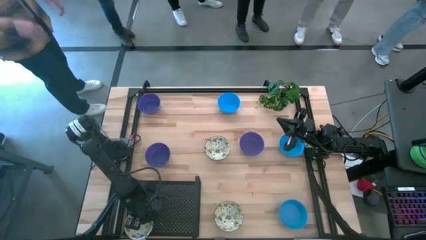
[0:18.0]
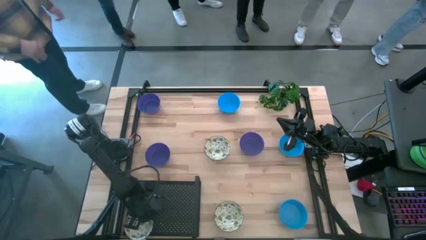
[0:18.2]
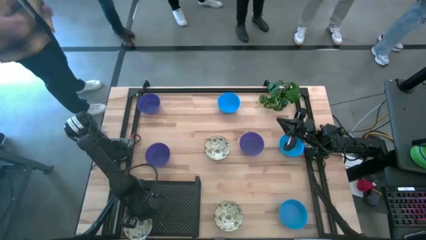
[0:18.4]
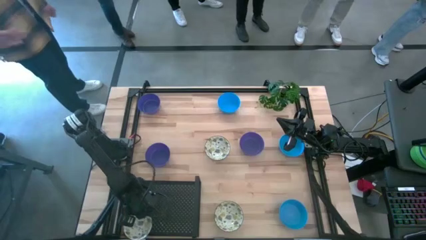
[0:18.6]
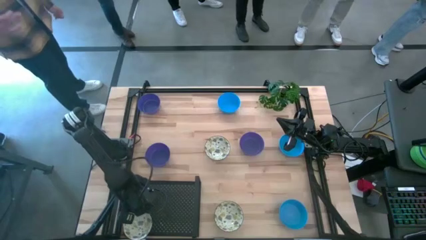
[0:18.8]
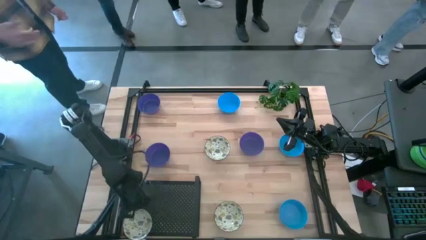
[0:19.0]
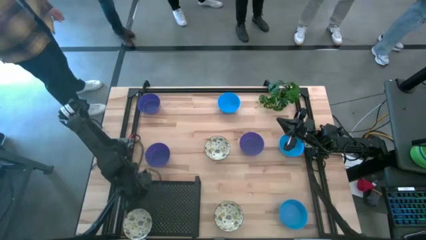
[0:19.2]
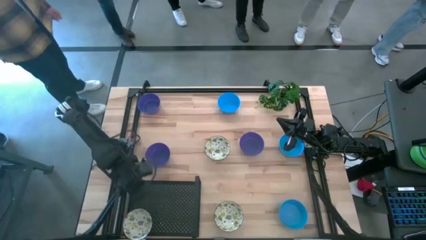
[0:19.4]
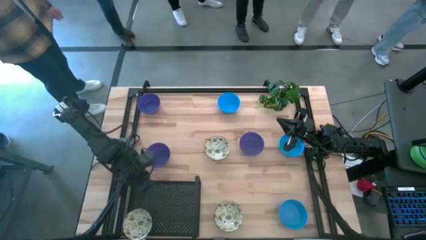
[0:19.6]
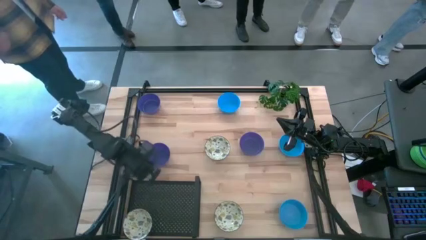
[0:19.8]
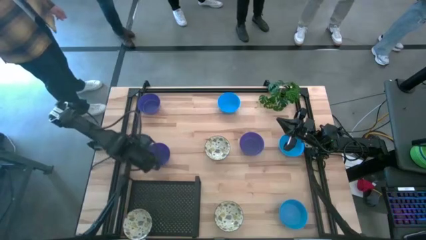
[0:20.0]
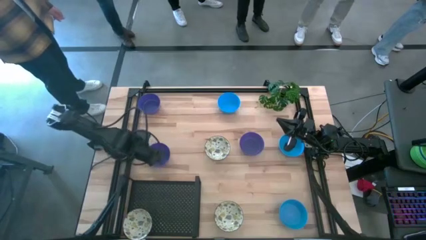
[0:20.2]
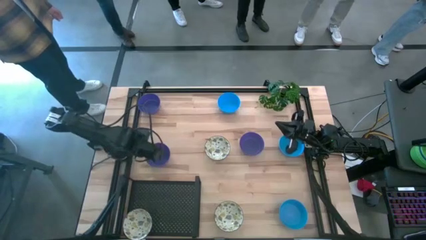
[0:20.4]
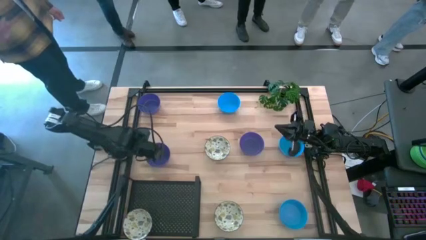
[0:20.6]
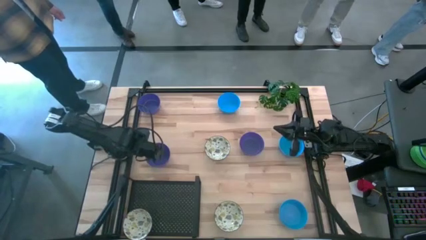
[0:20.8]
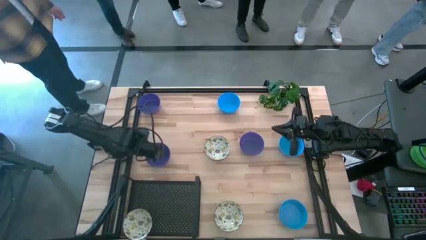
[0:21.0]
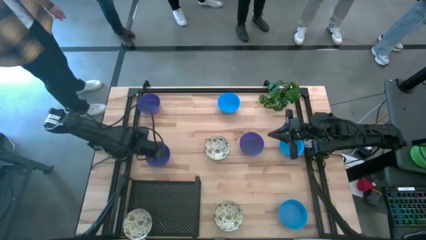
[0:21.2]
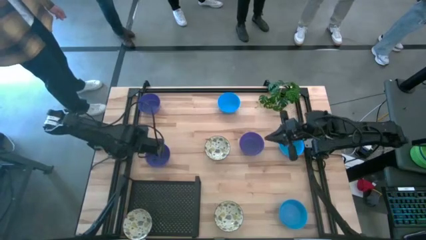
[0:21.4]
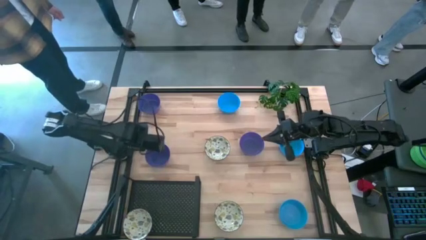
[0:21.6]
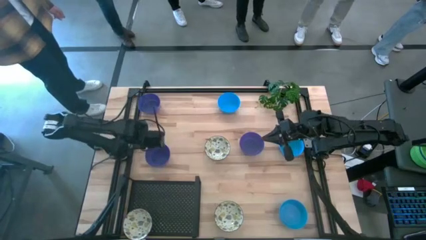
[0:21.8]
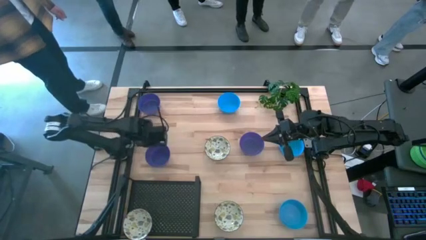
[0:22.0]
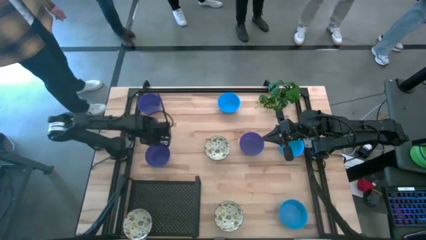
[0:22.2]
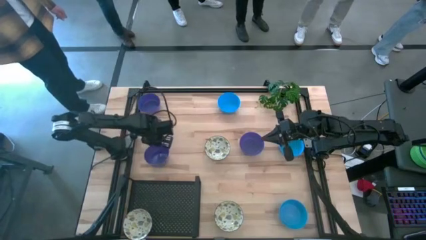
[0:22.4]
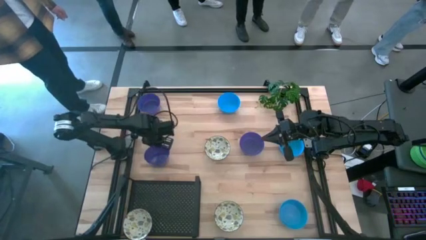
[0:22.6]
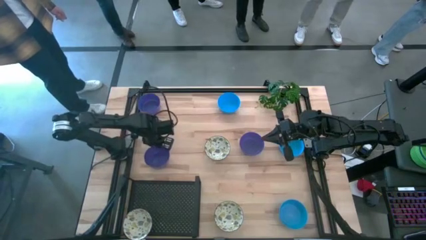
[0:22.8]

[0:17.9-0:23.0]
Task: Pick & Place Mini bowls
Put the bottom left purple bowl on the shelf

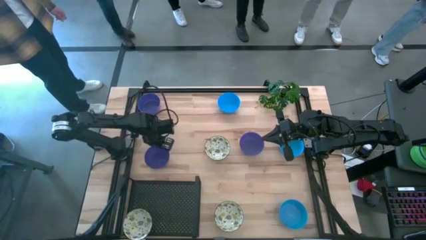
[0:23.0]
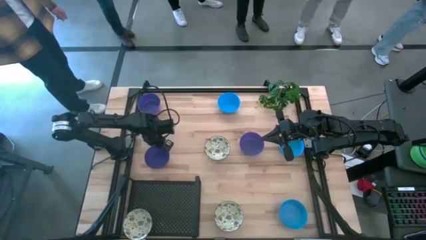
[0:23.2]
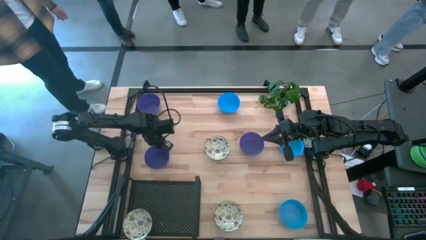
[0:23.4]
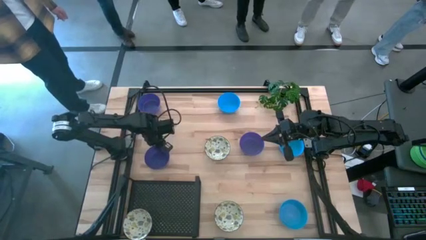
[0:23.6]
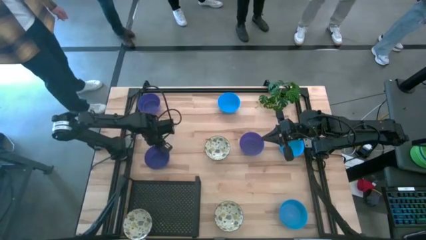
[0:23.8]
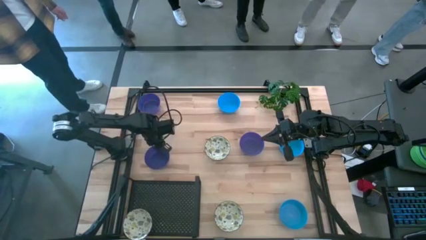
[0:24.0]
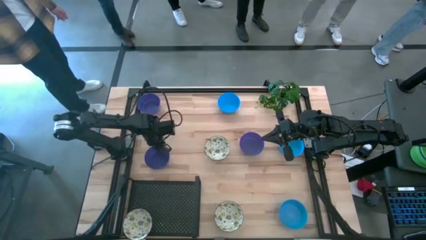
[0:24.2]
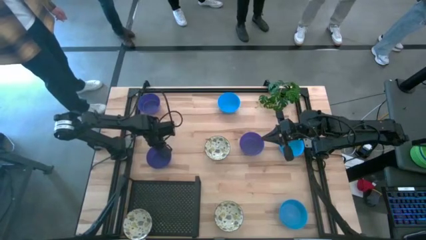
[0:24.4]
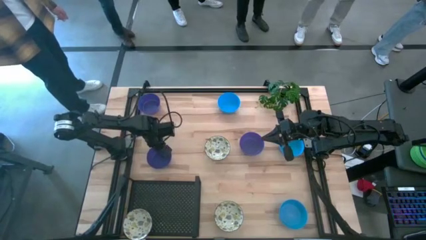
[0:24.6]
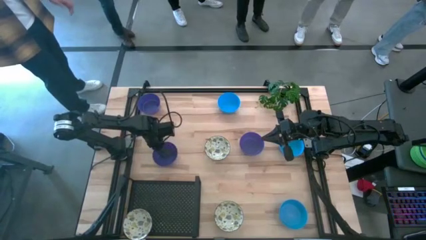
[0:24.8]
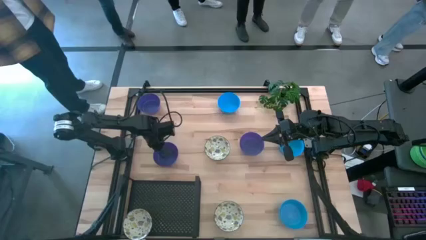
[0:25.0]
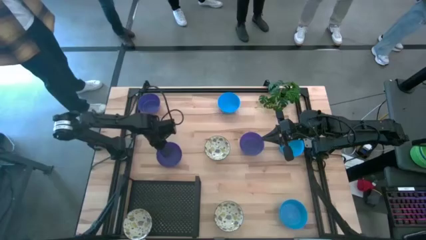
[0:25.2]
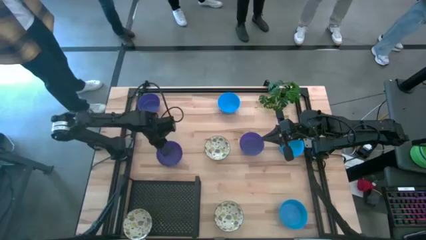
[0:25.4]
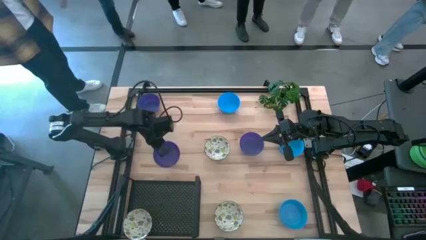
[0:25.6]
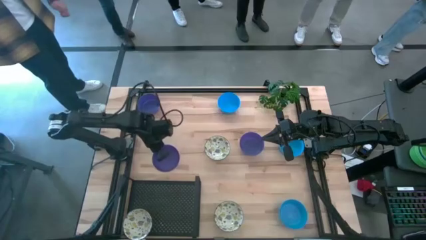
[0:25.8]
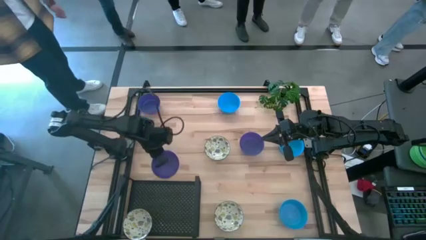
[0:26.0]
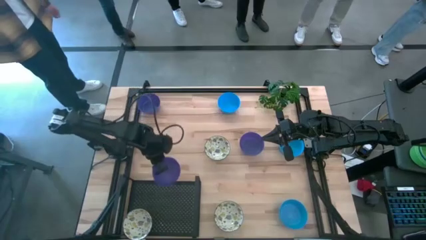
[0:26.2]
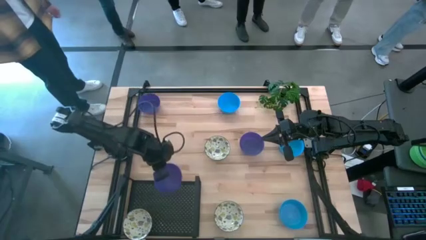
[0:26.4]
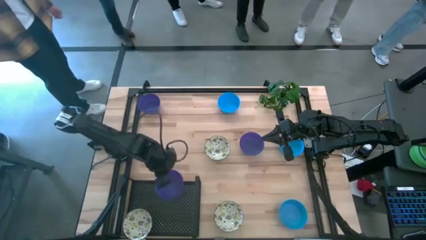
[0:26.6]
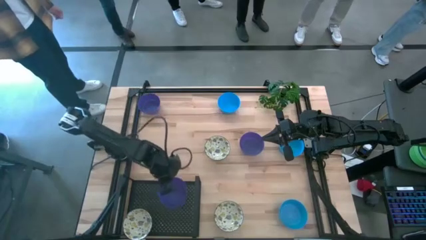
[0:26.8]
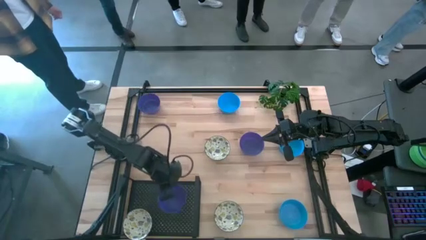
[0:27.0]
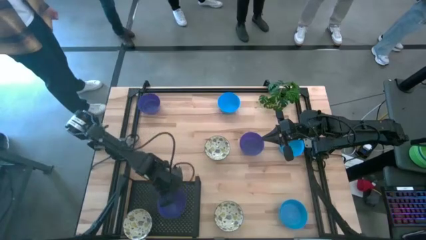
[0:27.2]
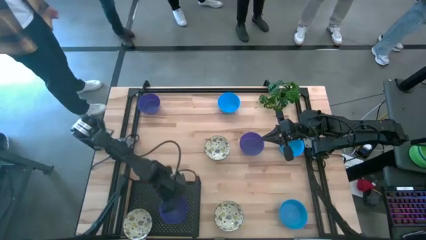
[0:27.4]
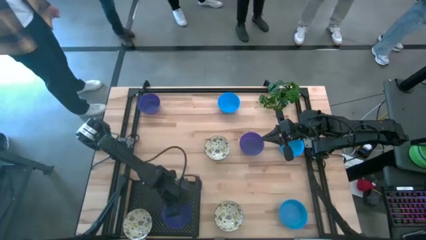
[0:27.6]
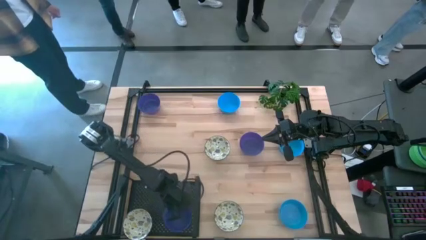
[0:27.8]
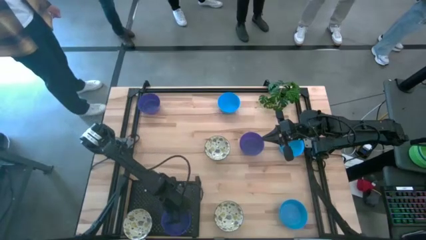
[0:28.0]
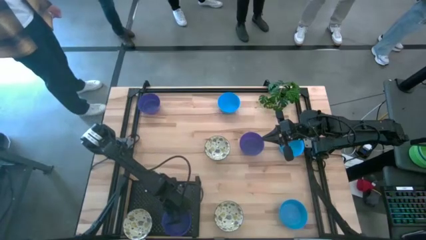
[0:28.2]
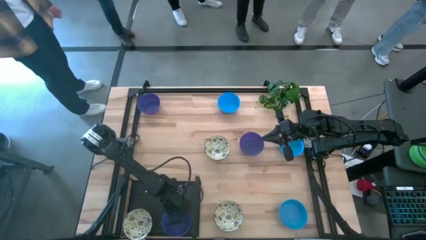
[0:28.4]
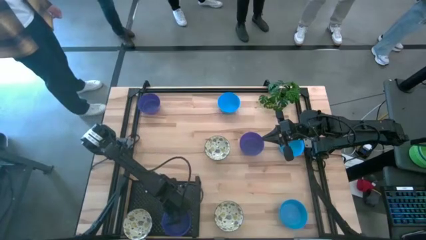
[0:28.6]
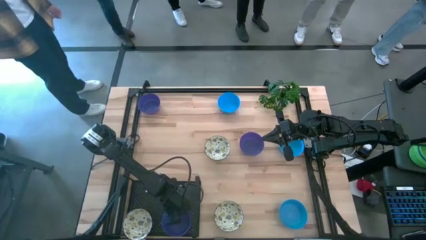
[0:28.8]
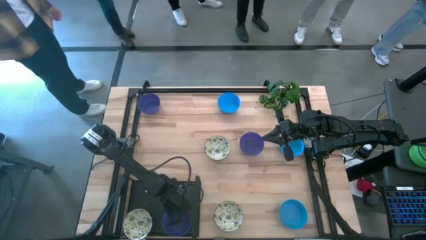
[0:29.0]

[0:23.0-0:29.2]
Put the bottom left purple bowl on the shelf
